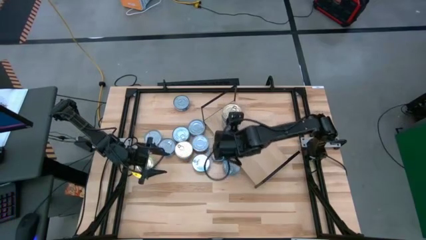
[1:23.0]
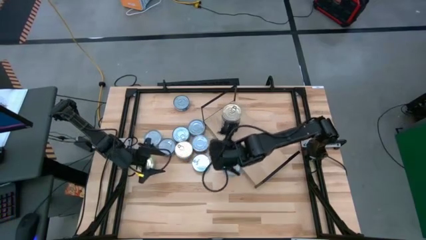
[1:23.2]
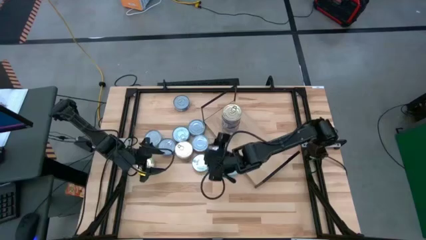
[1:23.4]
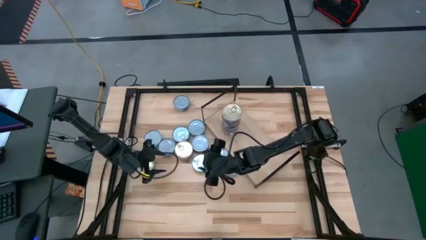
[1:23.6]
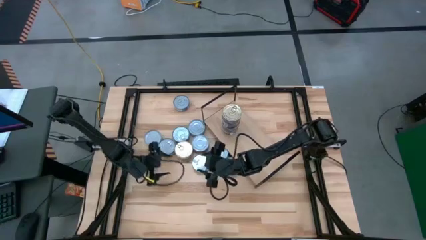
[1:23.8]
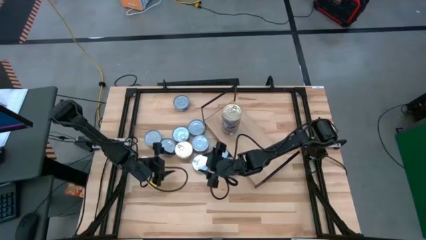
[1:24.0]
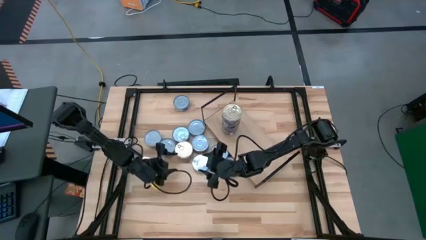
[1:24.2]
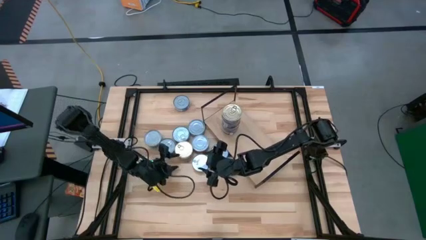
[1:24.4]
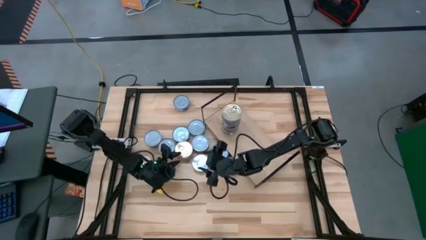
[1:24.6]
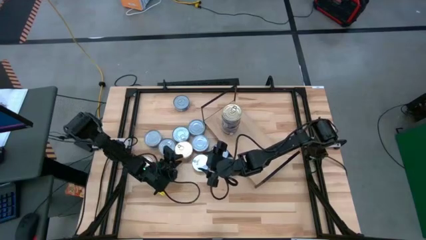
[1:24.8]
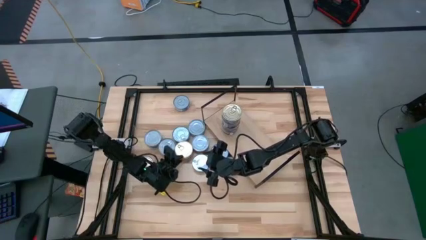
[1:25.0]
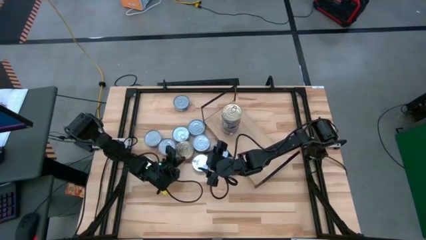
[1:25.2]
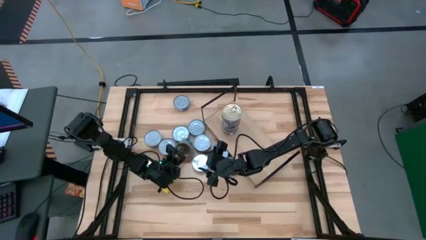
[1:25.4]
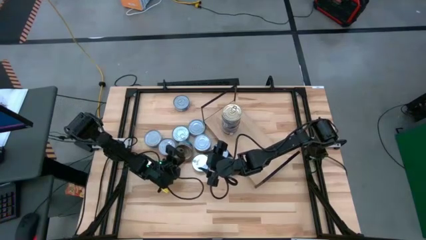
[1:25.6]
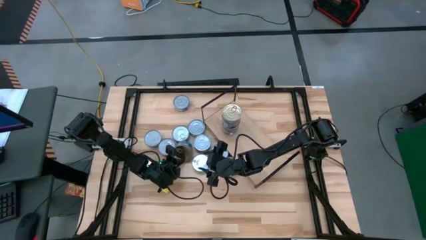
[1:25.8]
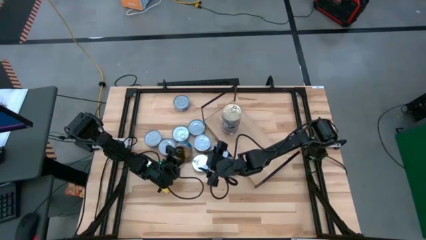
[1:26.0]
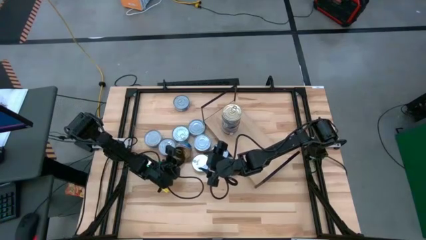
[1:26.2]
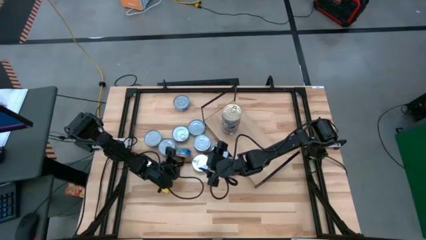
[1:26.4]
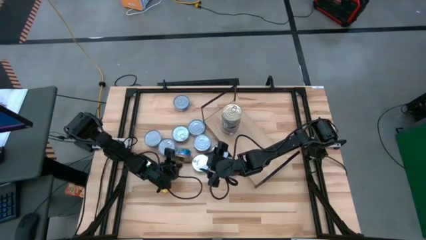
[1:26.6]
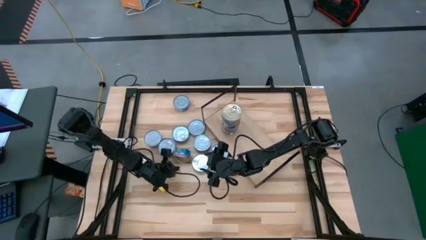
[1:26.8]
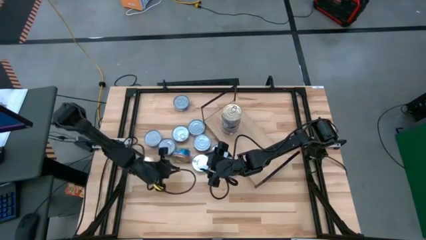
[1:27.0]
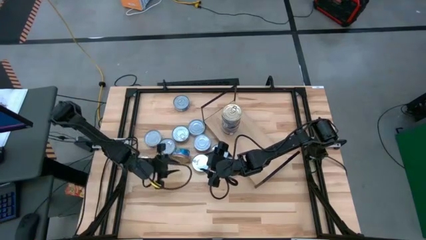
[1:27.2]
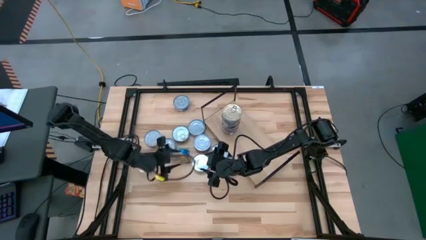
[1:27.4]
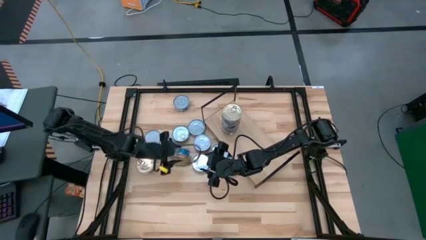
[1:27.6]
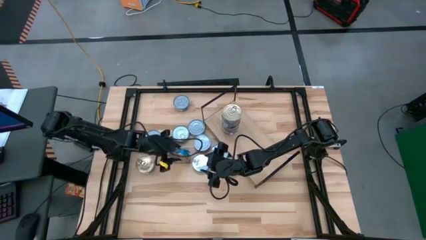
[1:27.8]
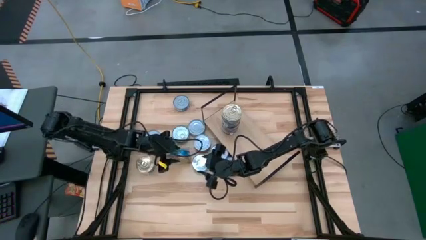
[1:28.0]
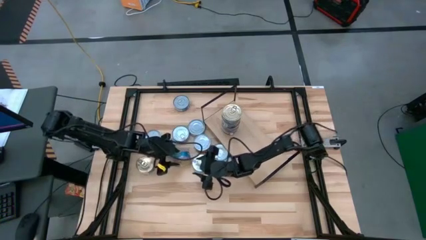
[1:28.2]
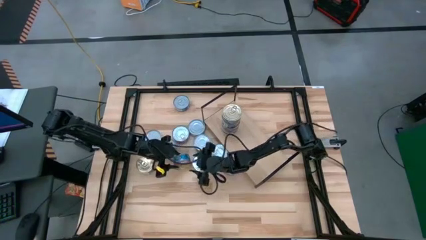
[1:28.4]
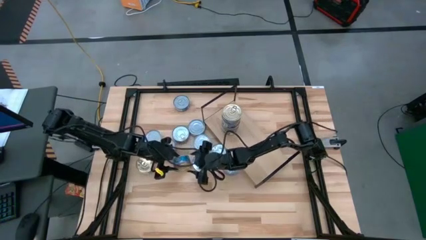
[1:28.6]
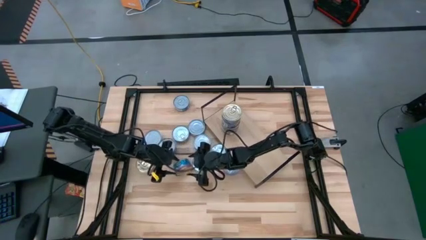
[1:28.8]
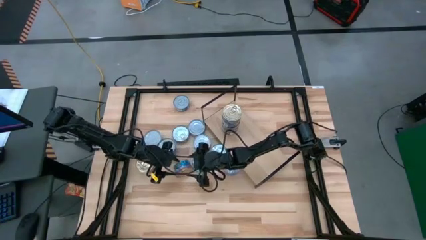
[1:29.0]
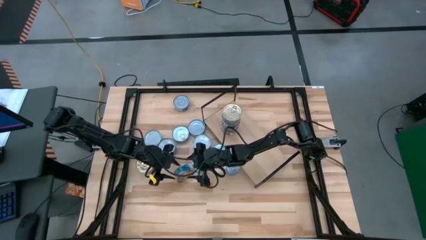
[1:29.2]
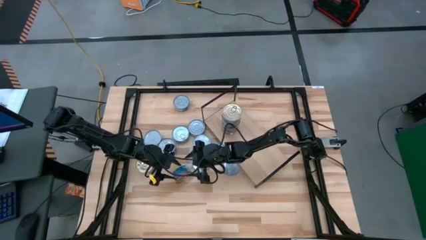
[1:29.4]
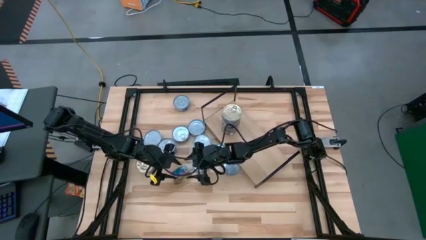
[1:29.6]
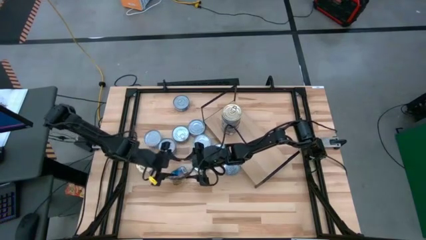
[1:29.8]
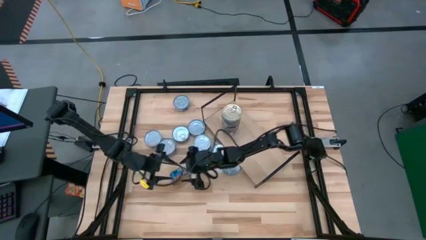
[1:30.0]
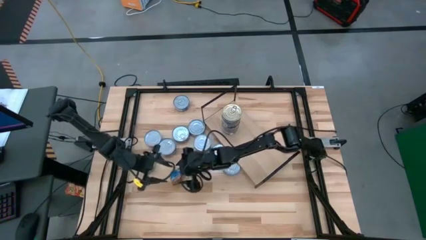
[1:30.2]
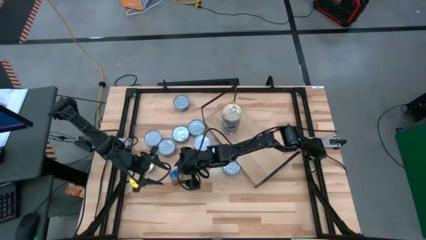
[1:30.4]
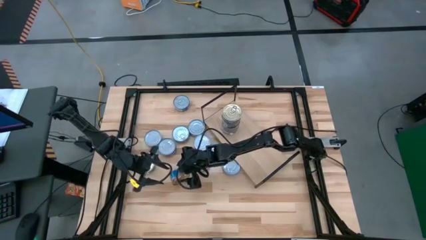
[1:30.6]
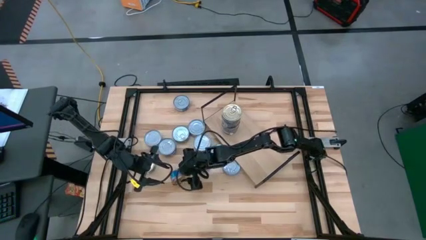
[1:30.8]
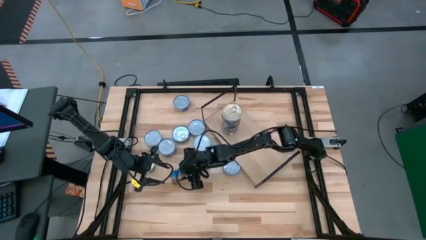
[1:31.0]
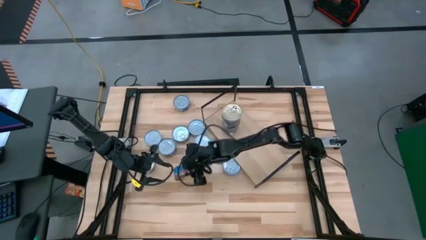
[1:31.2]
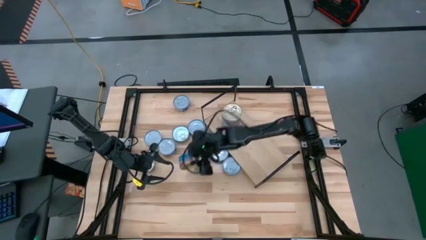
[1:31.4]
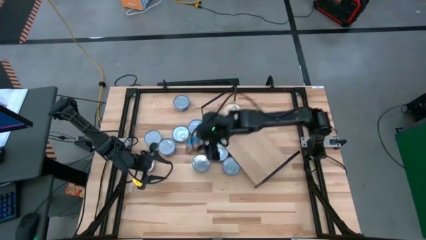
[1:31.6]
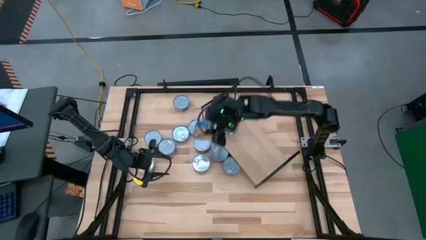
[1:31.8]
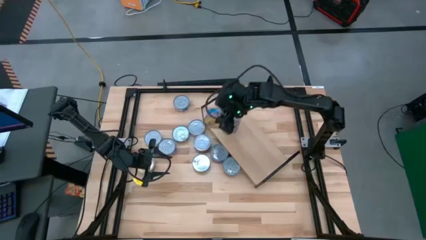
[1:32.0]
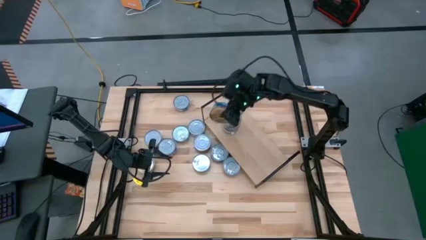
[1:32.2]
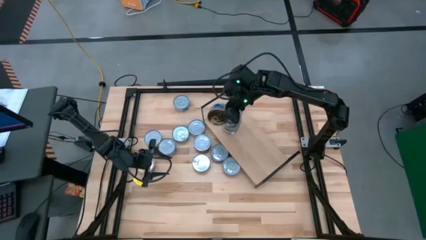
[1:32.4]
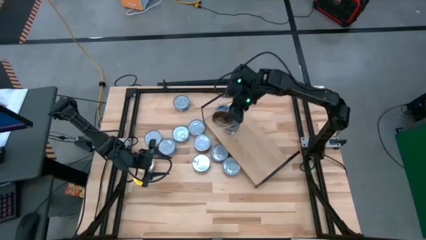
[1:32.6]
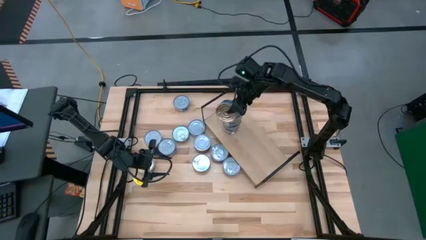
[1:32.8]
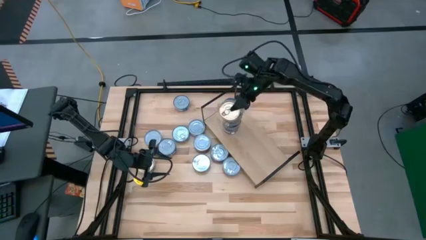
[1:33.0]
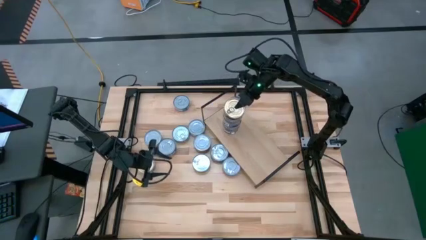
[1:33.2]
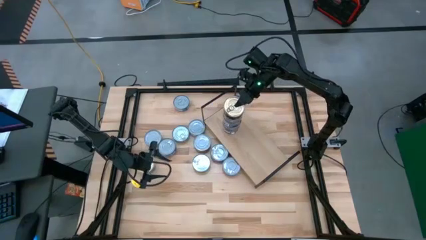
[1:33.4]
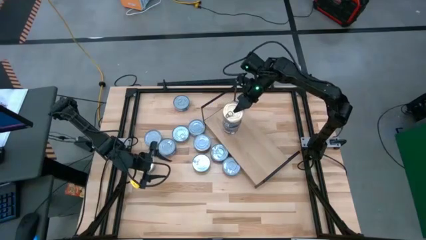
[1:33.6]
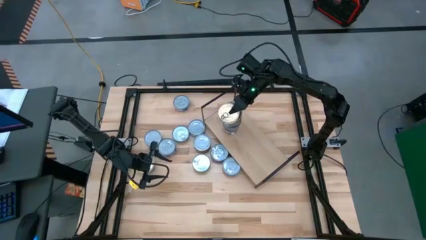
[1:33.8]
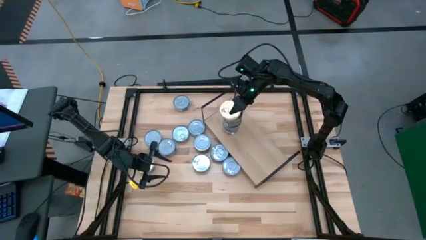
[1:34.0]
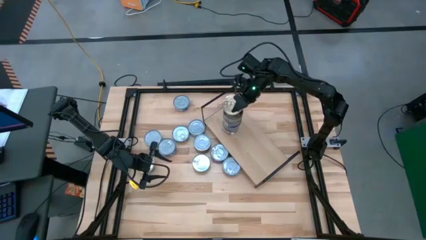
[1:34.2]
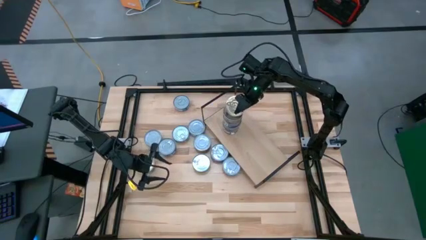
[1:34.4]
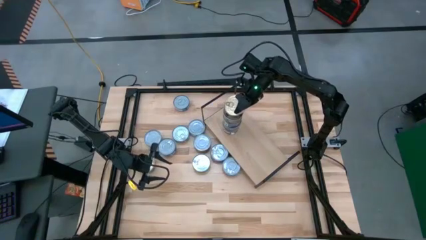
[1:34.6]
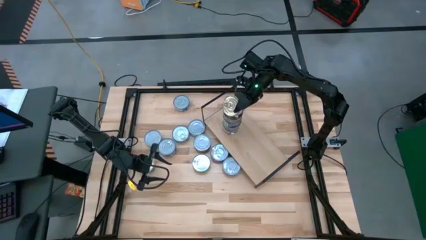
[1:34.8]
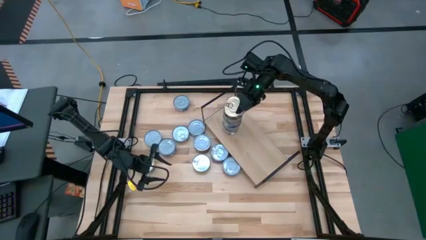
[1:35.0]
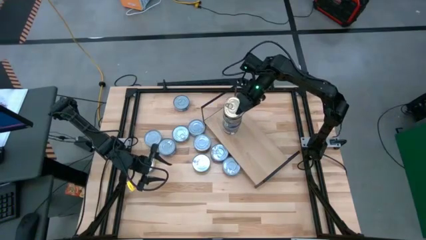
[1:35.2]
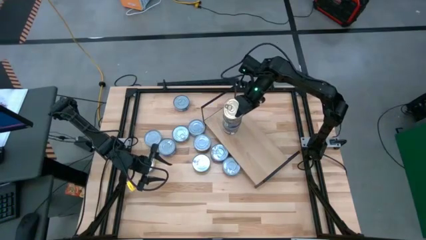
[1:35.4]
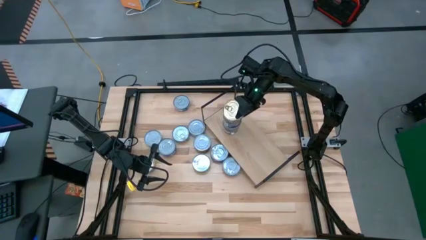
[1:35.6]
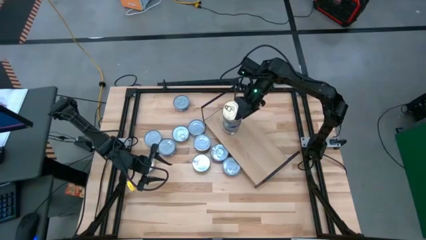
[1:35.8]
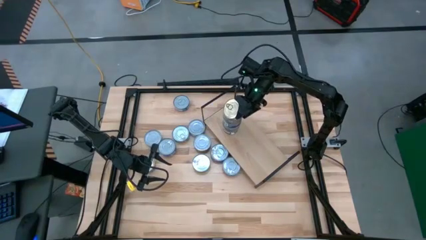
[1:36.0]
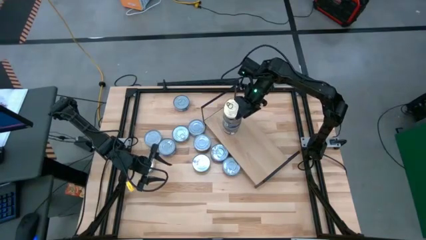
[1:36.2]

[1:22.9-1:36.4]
Task: Stack canned seafood by type on shelf
Stack the blue tuna can on top of the blue tuna can on the shelf
